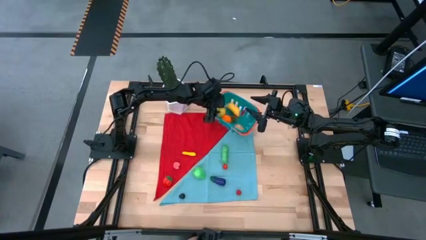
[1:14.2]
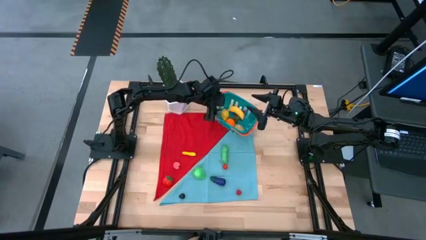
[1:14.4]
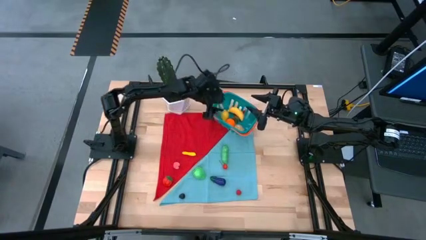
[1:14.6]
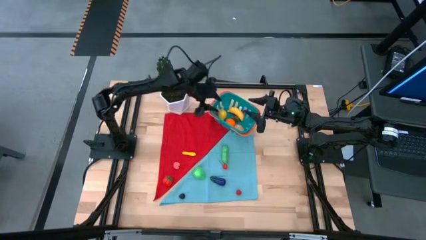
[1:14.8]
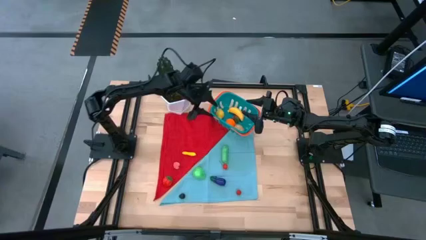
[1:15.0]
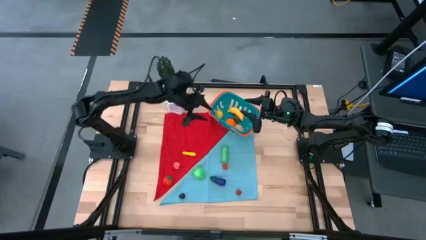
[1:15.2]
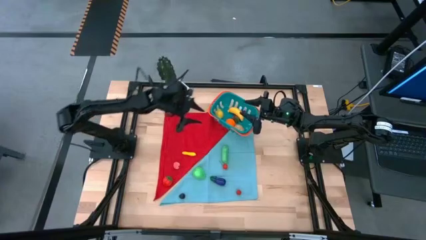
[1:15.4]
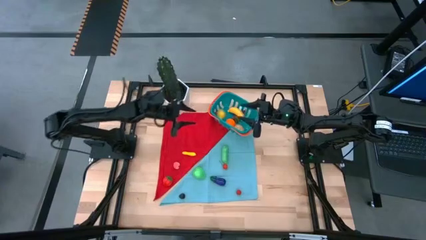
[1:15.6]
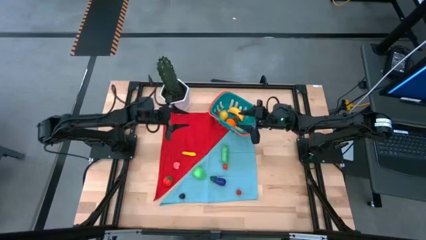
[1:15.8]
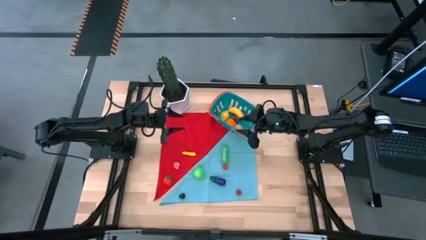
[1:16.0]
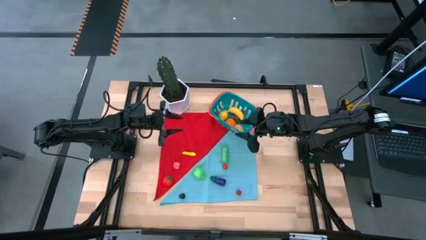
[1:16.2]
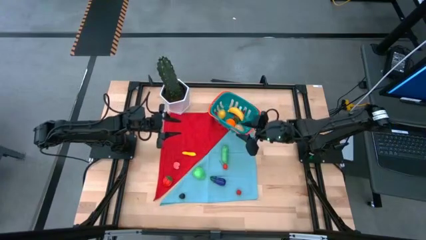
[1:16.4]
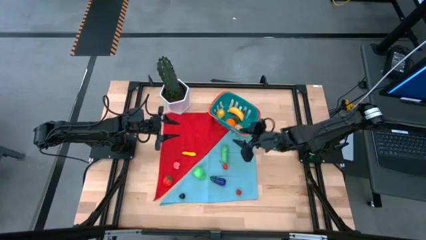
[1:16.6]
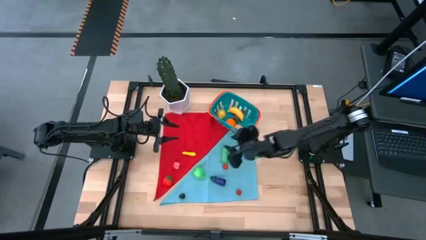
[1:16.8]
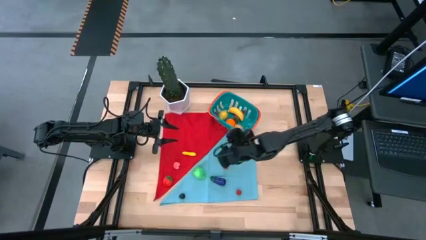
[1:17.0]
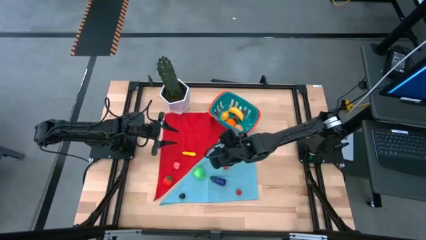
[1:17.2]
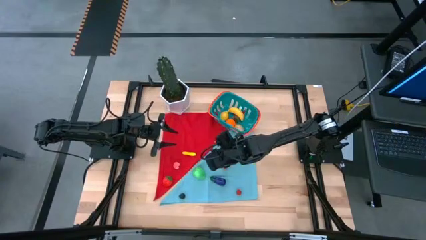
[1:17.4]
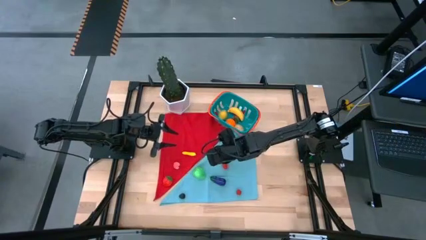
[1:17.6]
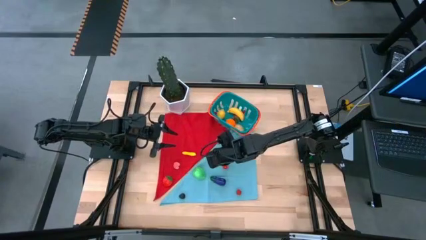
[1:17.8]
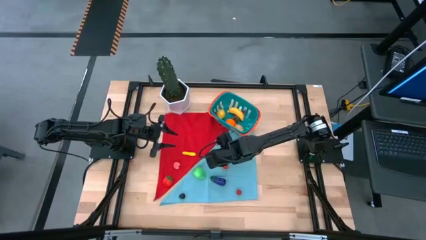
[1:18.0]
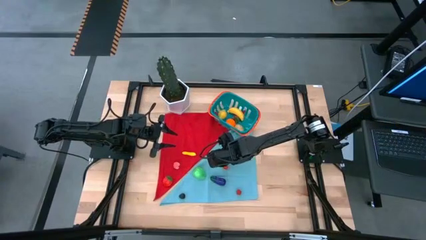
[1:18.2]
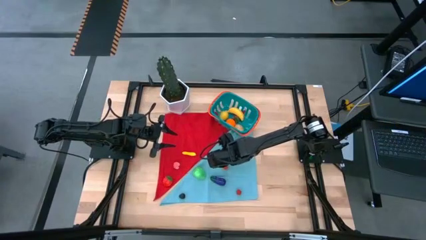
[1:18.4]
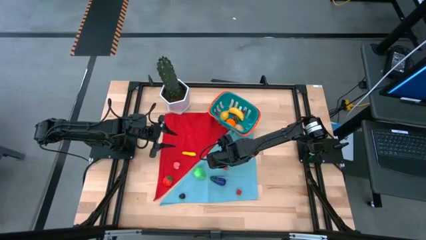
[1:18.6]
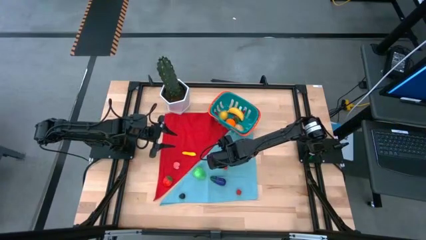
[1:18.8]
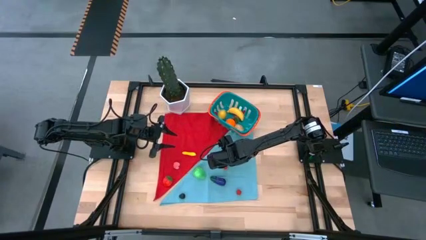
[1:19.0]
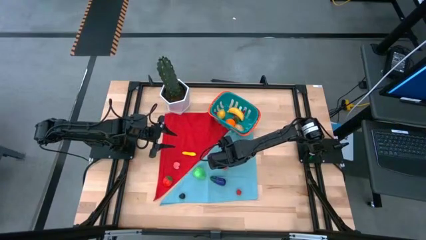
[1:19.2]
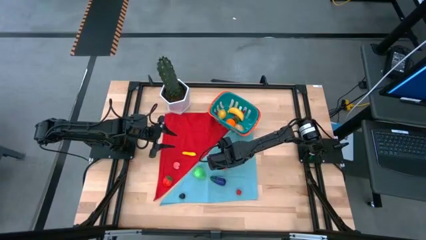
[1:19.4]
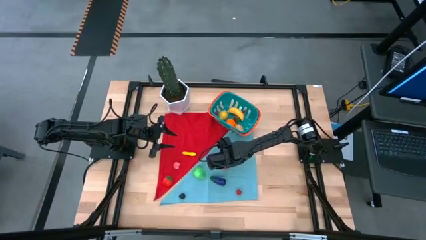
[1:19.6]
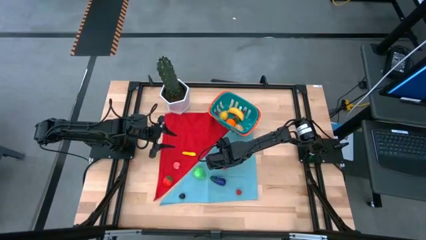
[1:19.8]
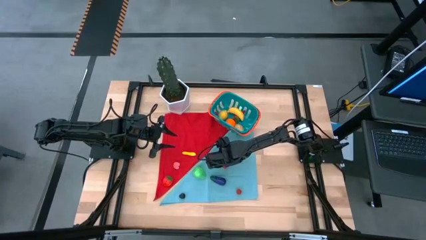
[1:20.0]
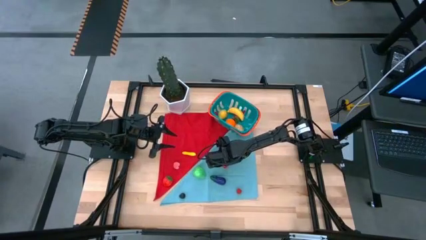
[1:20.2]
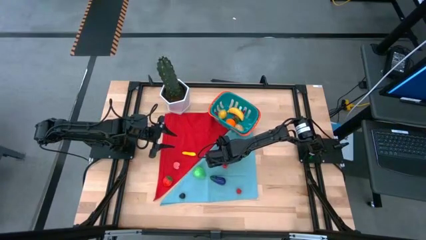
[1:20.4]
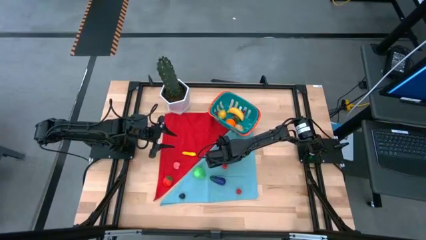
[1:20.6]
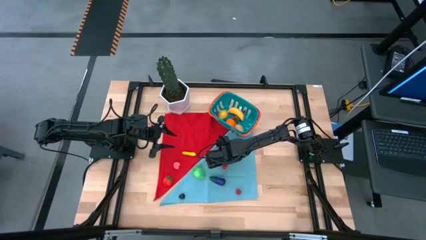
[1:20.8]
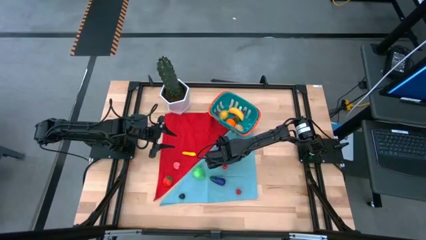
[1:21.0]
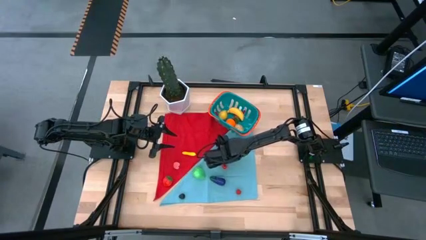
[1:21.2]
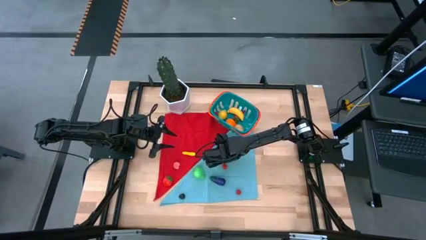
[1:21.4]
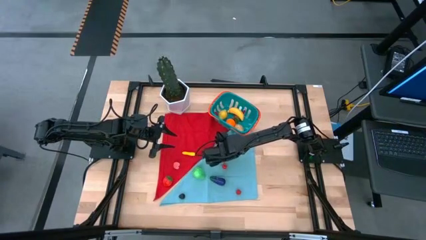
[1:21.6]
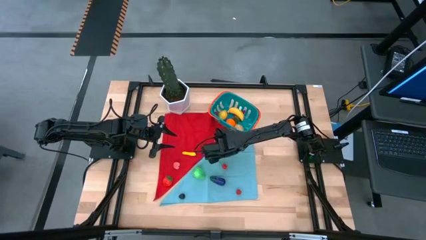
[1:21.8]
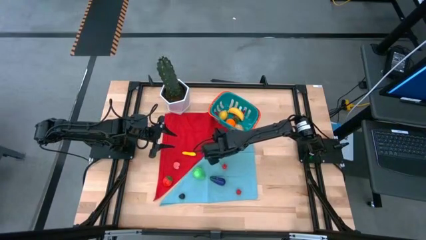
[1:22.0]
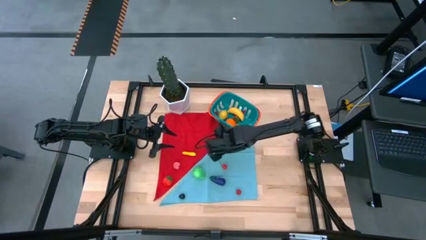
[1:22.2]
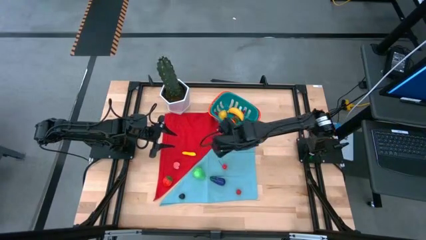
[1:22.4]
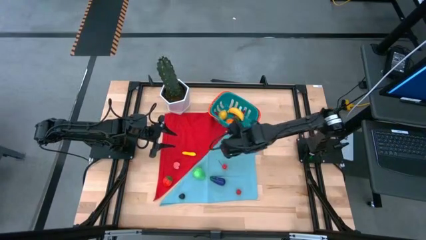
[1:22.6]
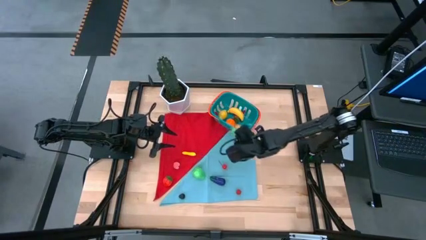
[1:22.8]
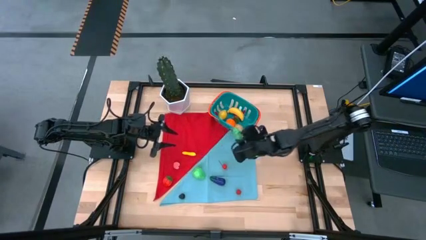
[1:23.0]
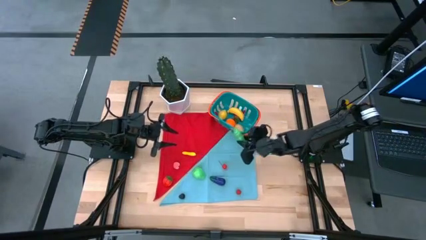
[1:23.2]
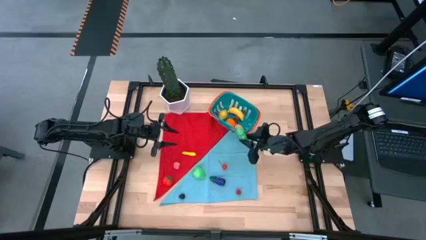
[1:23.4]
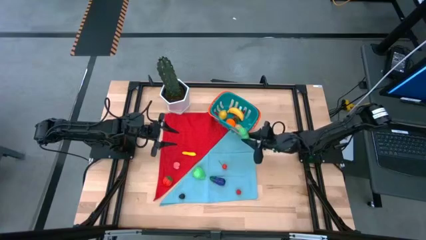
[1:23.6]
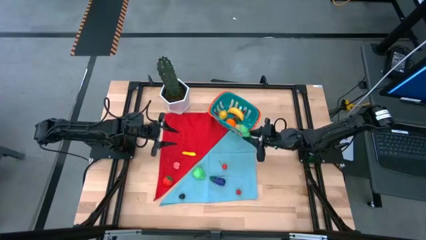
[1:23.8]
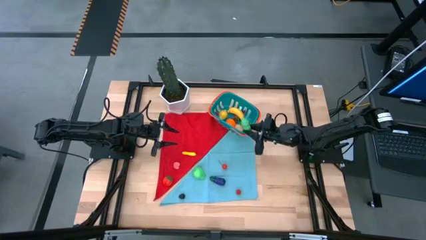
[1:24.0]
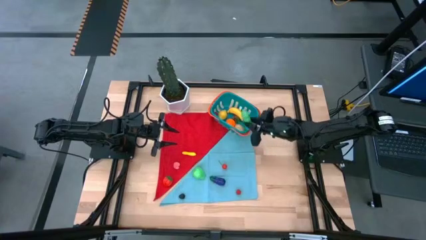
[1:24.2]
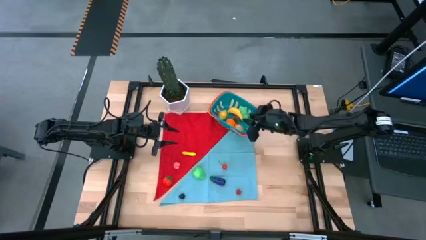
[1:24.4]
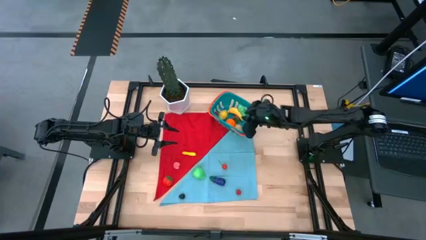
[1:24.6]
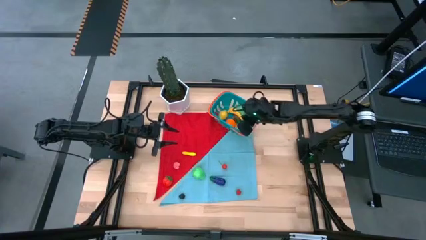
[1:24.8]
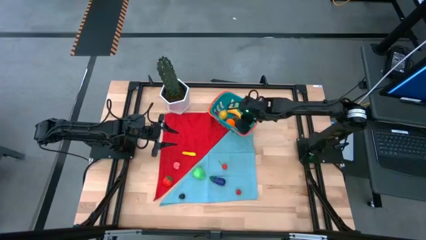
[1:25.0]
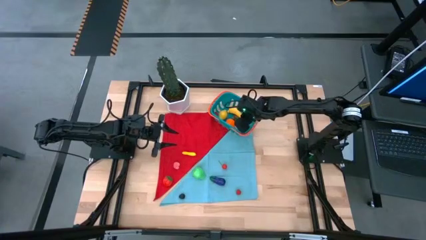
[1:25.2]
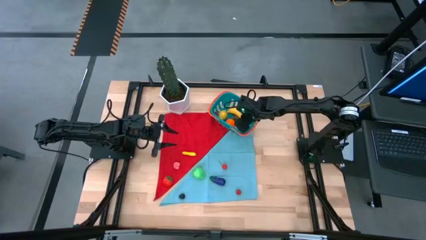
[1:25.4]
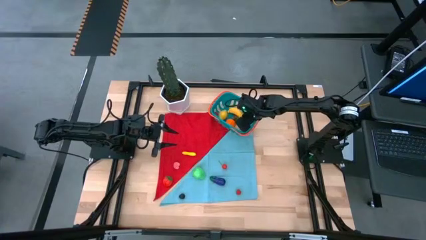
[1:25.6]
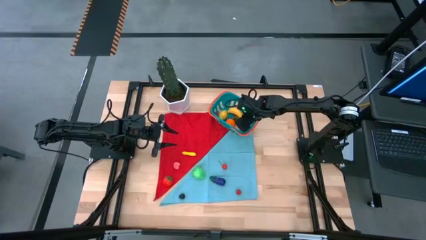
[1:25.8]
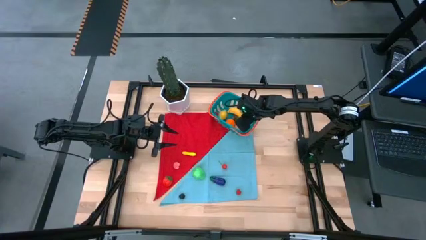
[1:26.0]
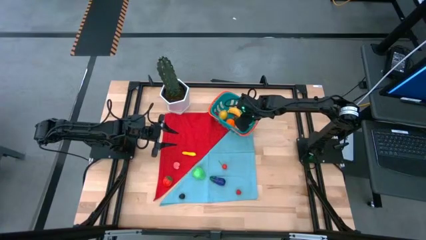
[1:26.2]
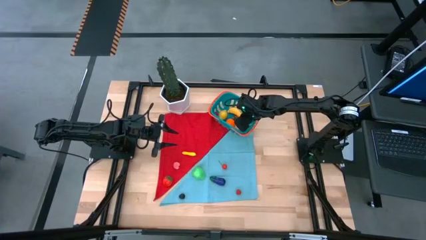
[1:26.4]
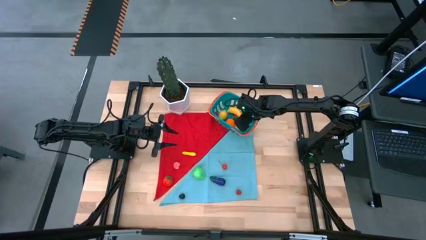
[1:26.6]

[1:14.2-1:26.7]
Task: Pick and placing Produce into tupperware
Put the green pea into the blue basket
